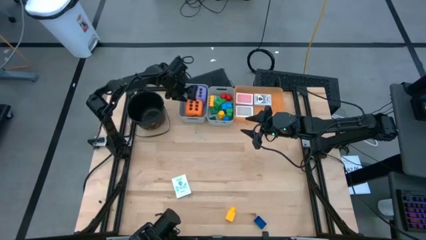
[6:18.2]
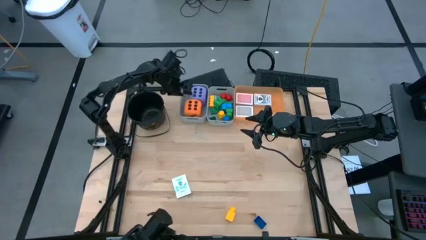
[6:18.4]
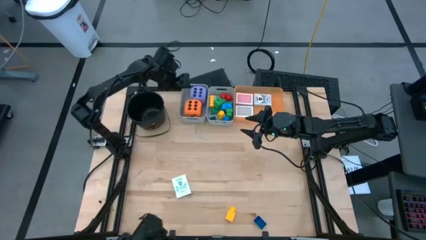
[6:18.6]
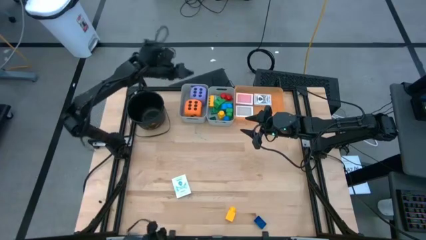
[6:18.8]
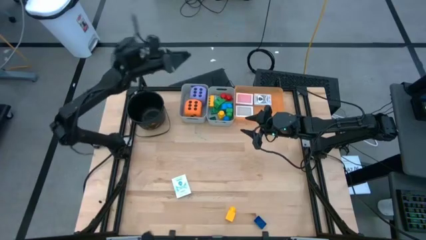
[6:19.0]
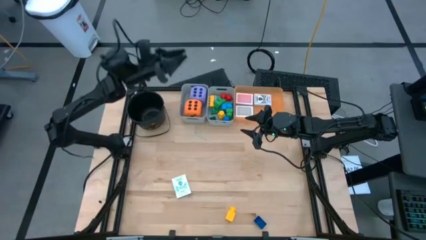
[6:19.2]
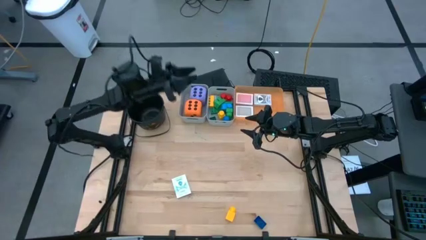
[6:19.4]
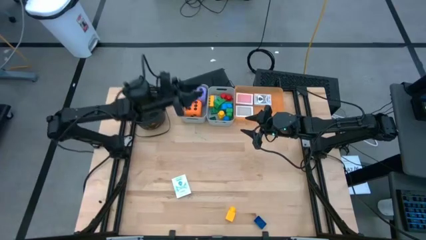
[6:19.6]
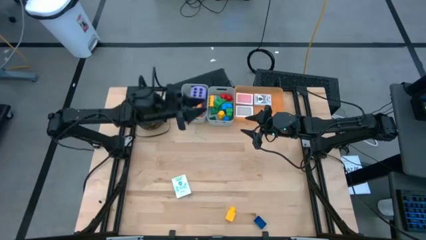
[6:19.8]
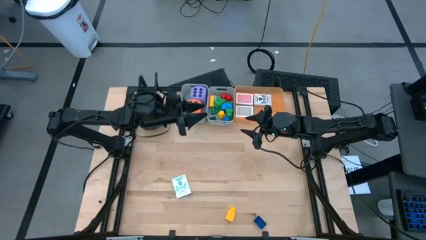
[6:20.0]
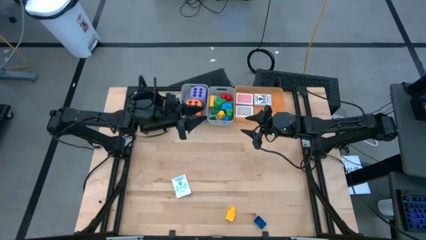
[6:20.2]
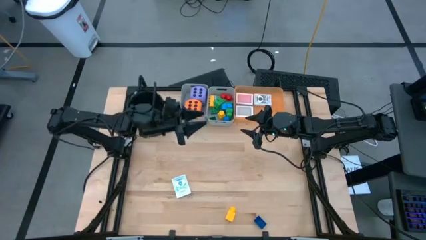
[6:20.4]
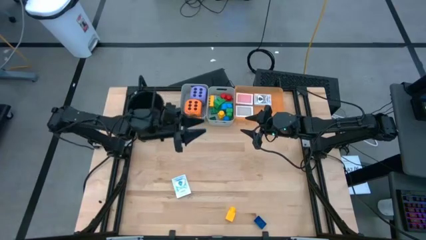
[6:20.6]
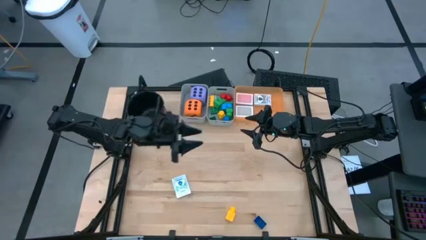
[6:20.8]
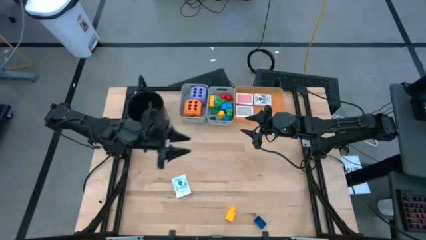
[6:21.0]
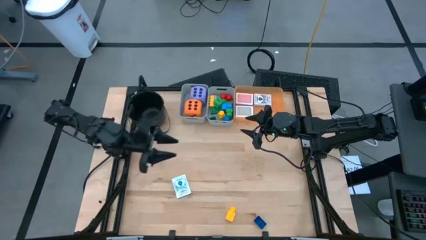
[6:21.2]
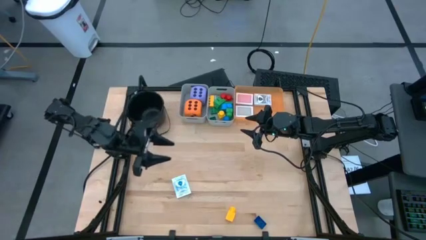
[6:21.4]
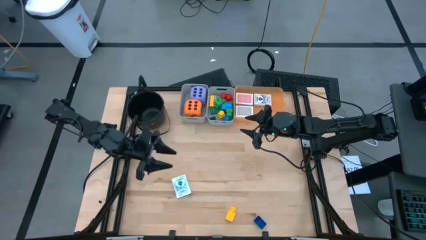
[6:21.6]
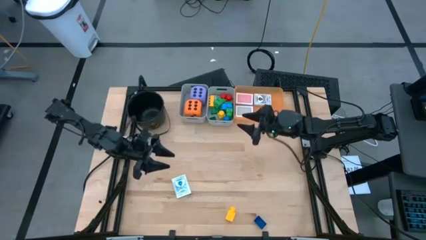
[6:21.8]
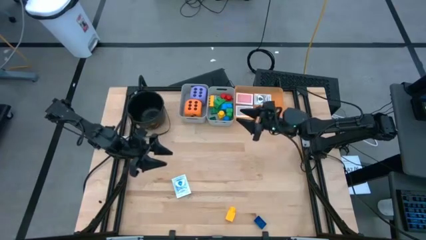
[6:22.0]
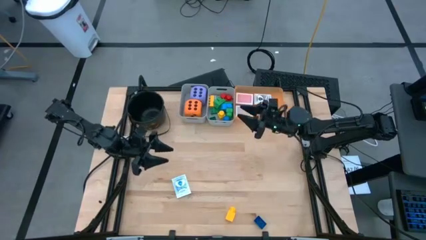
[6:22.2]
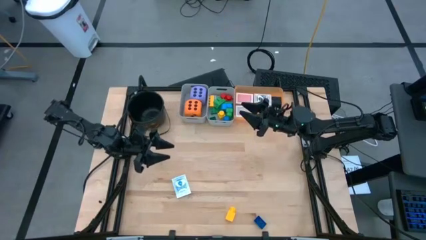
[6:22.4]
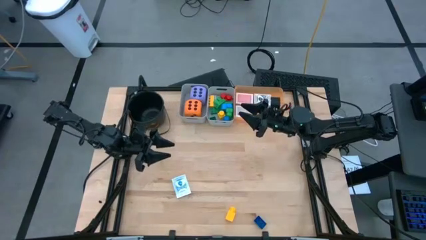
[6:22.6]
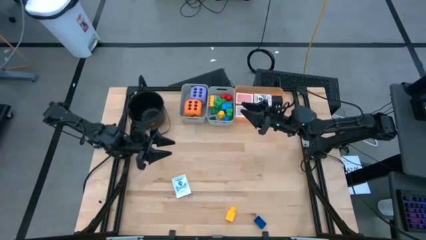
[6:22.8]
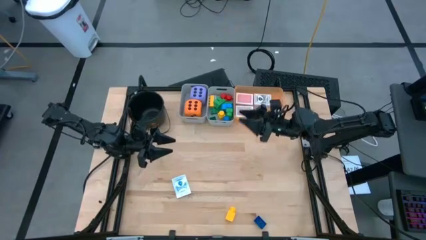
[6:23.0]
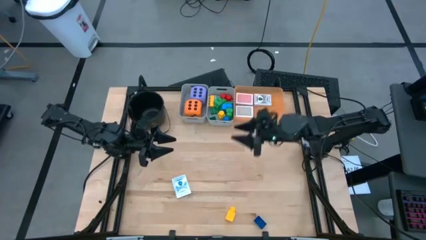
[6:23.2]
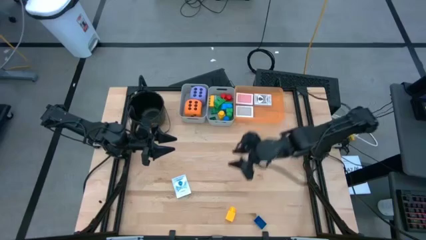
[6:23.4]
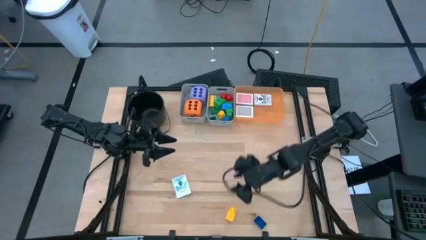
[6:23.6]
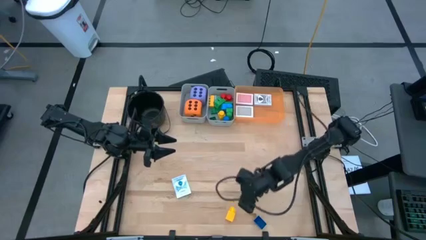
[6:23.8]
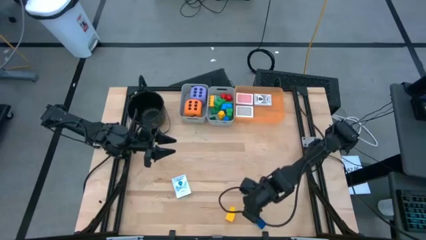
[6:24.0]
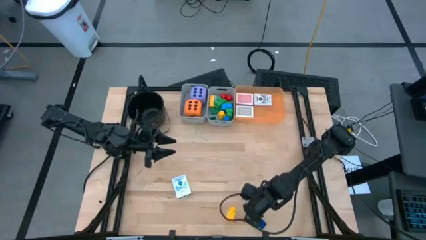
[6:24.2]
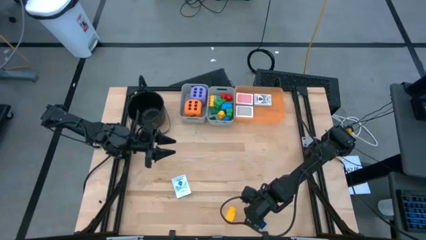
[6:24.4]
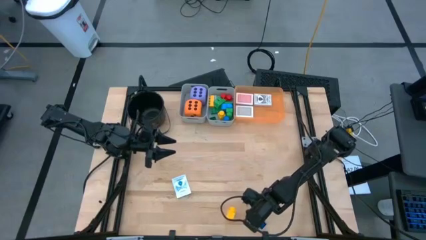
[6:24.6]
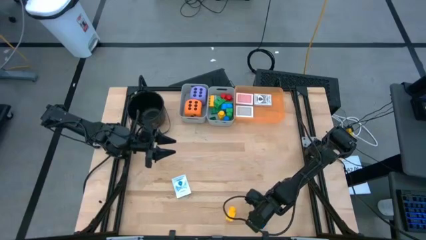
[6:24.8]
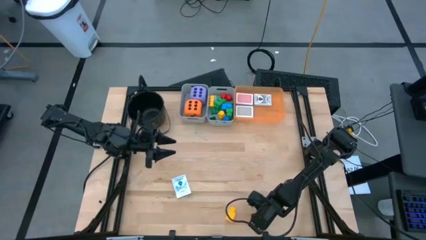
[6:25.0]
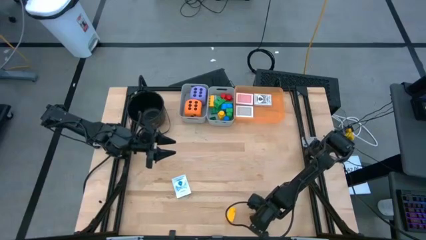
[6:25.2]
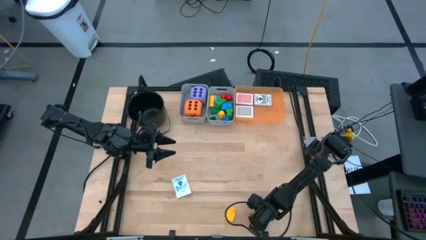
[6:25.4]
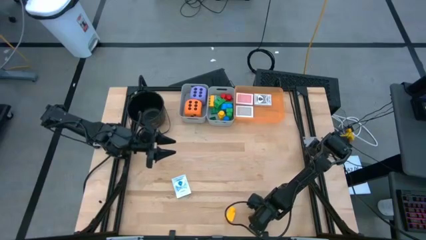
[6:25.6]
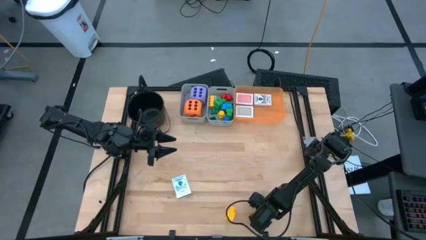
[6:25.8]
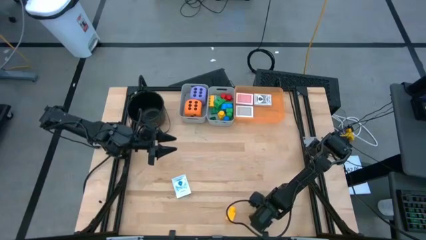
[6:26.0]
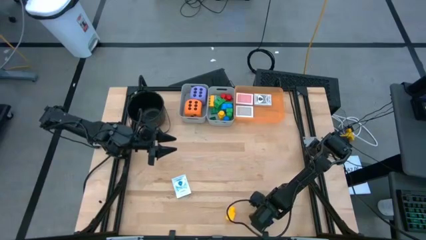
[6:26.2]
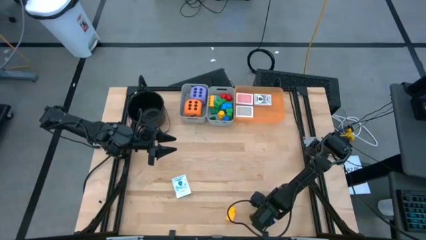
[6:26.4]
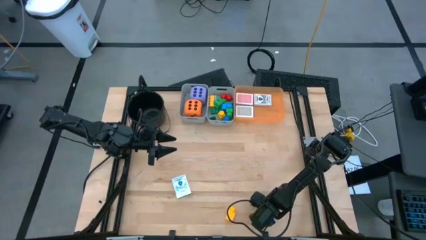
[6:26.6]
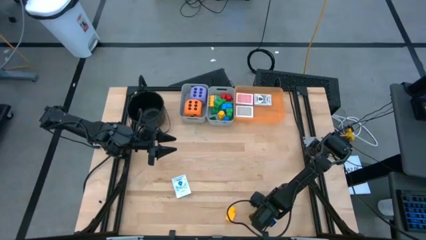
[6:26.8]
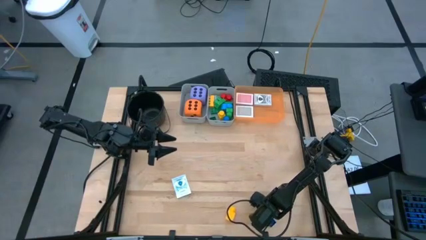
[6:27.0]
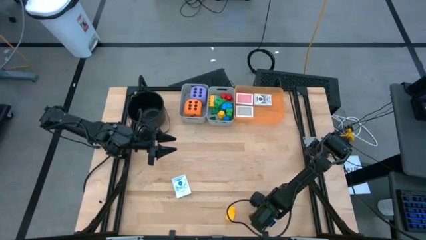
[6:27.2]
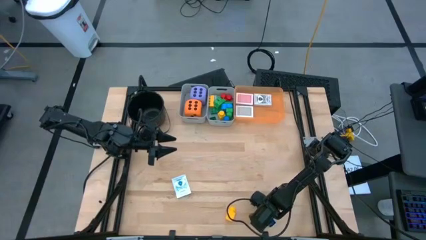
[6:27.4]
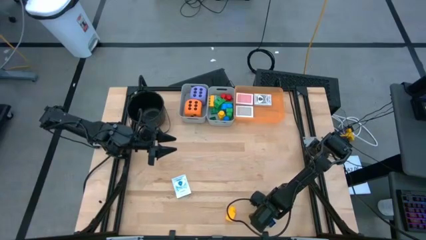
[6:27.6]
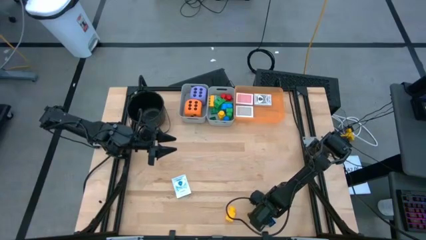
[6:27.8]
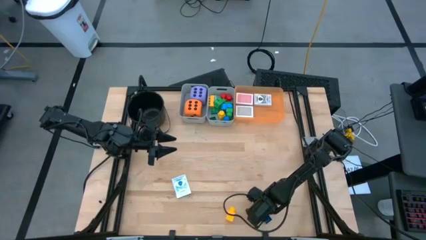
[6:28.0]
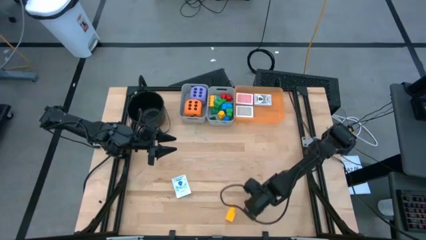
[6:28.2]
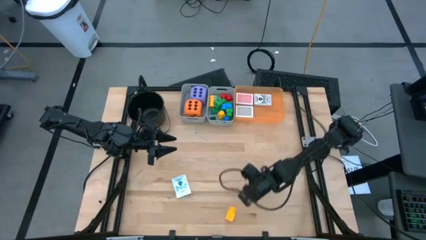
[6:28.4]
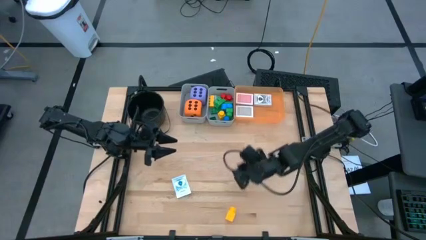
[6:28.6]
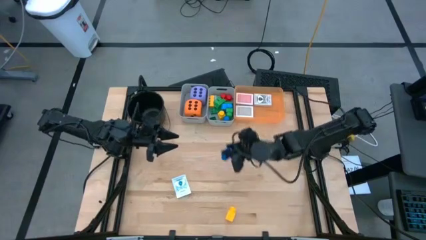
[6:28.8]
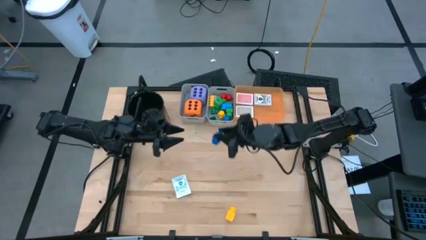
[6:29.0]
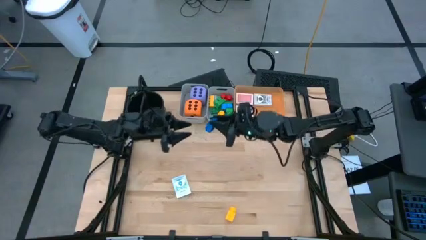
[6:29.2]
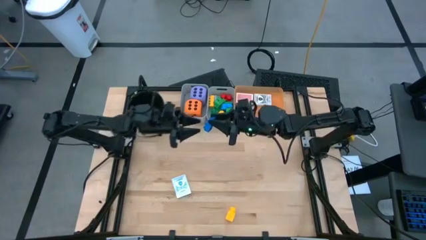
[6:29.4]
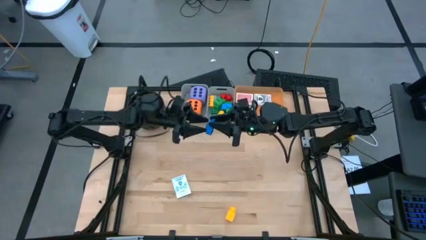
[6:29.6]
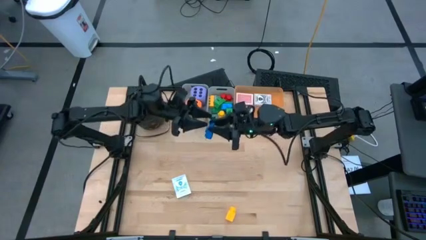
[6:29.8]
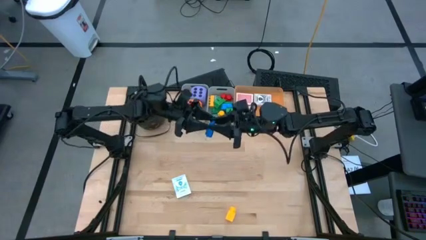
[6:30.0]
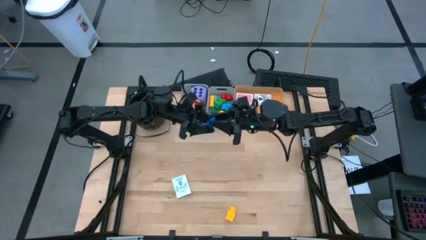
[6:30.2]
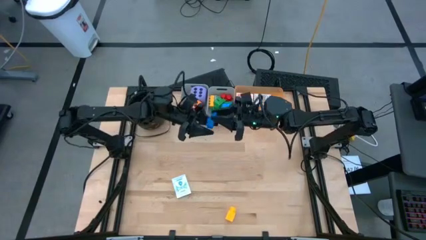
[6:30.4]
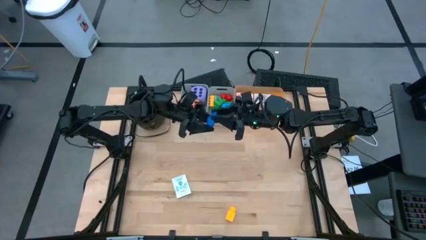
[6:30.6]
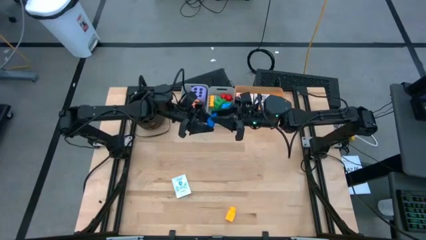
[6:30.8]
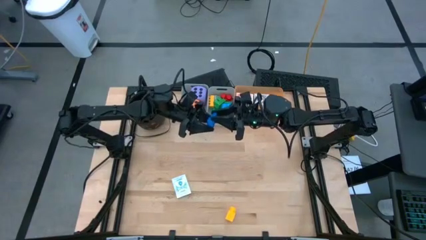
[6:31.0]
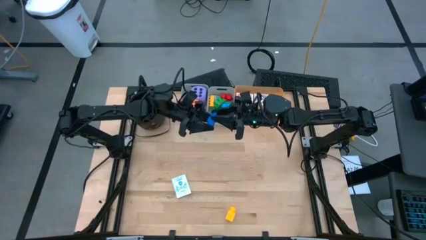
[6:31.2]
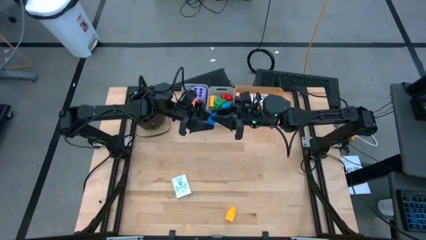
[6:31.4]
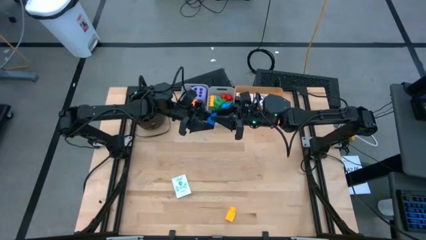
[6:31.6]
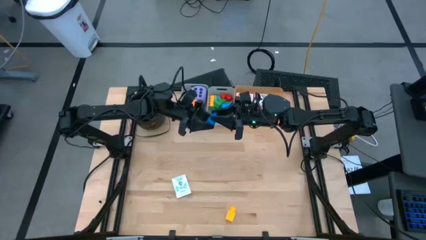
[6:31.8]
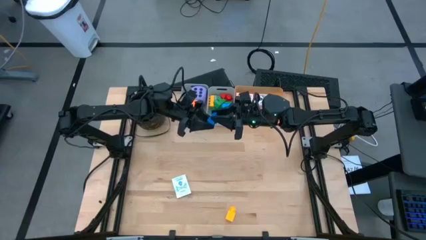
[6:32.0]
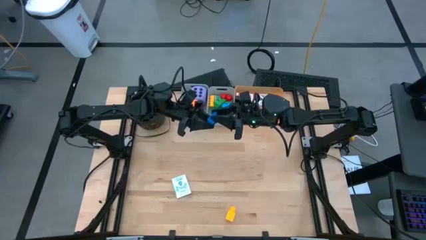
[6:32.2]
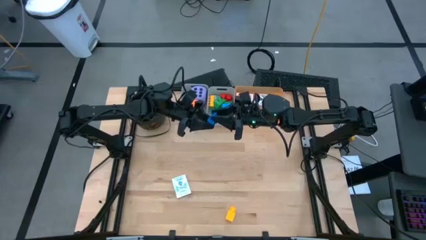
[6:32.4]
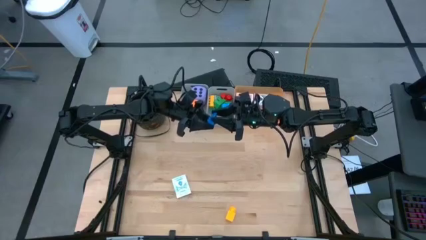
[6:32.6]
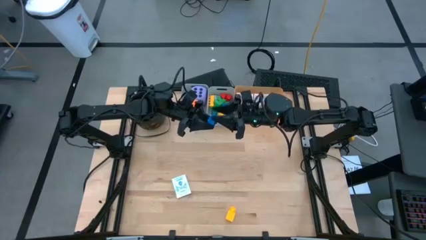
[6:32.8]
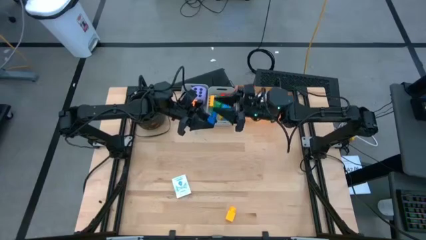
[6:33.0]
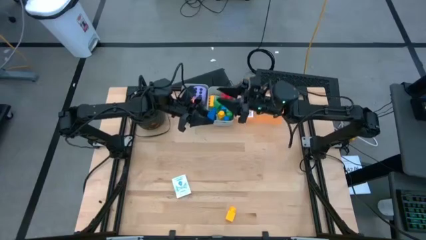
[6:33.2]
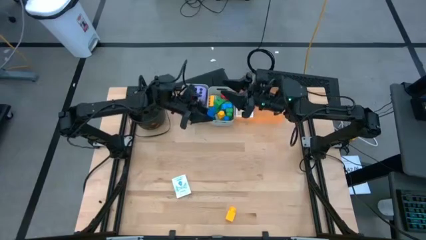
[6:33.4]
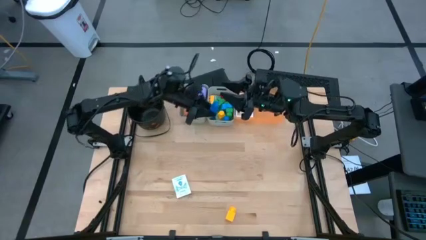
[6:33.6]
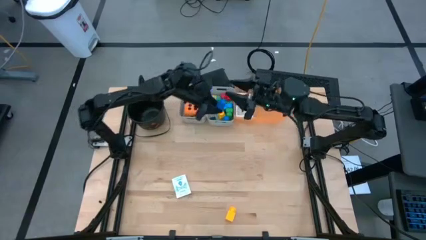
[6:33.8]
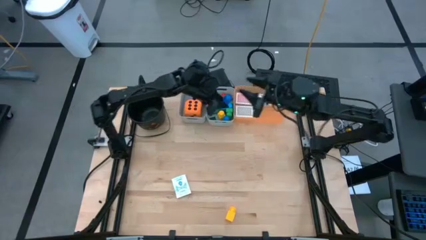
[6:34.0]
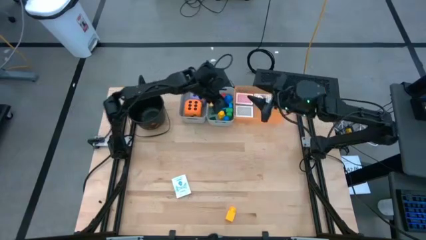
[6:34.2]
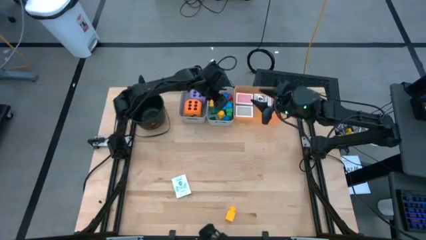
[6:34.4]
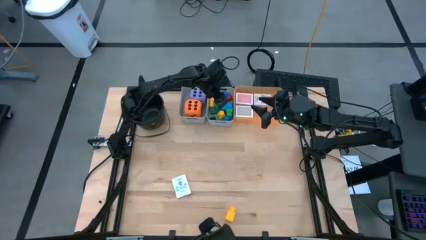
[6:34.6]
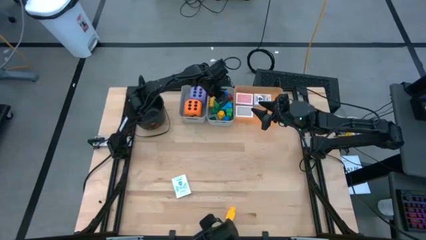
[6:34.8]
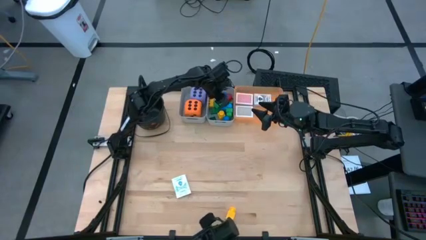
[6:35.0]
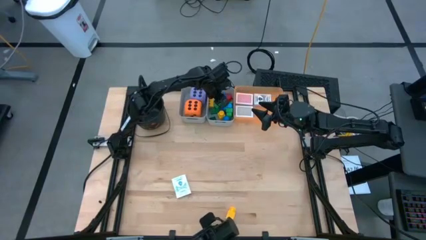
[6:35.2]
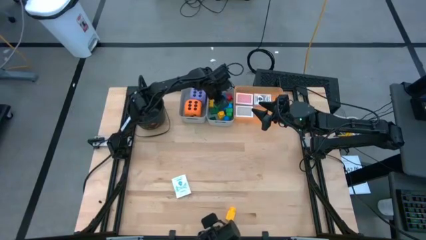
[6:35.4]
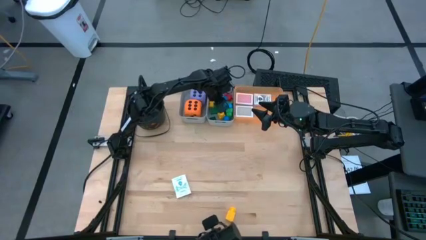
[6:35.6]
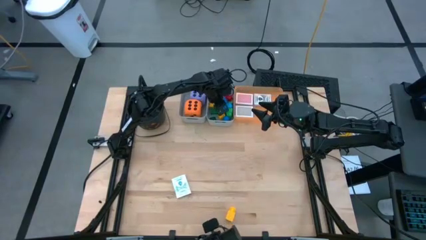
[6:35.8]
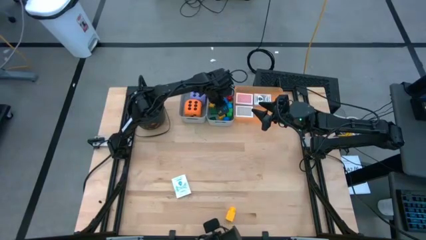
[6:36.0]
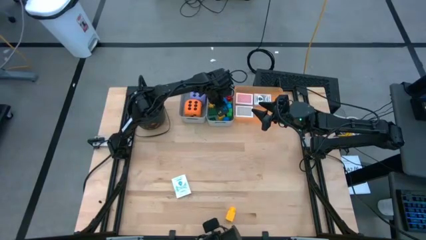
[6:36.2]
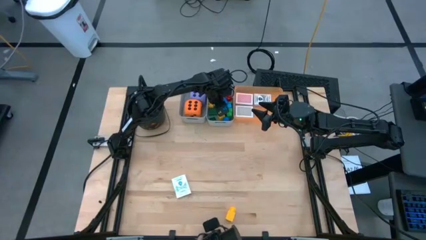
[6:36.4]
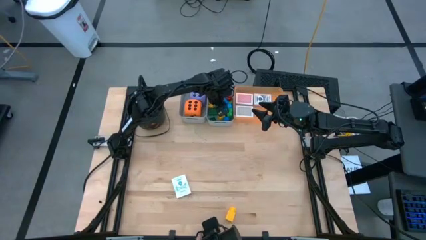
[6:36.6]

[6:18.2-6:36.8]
Task: Pick & Place Toys
Put the dark blue gamepiece into the right gray bin
